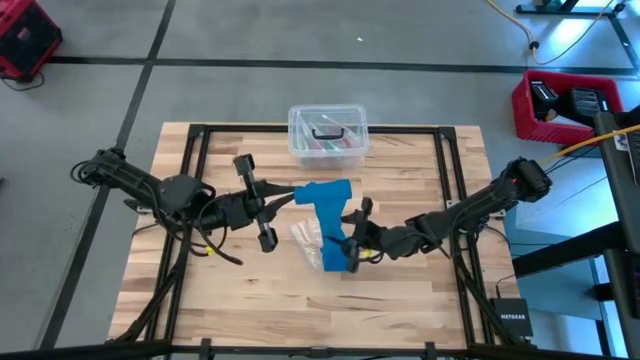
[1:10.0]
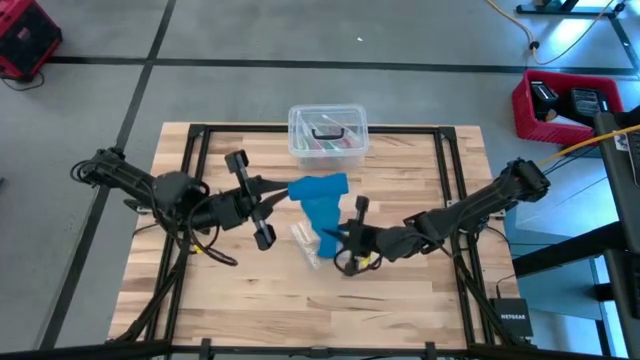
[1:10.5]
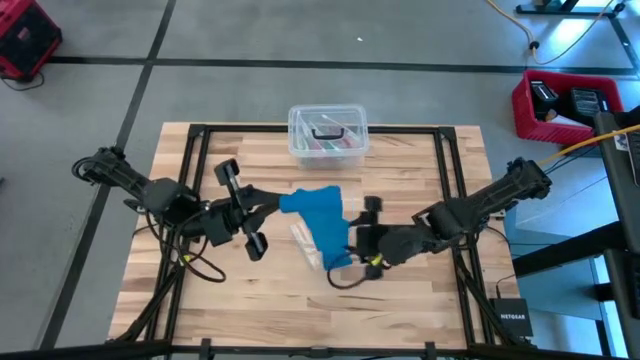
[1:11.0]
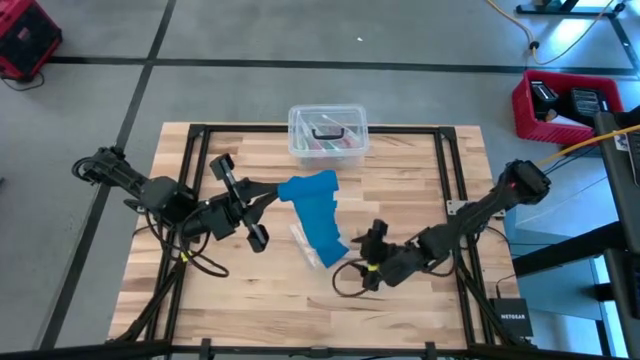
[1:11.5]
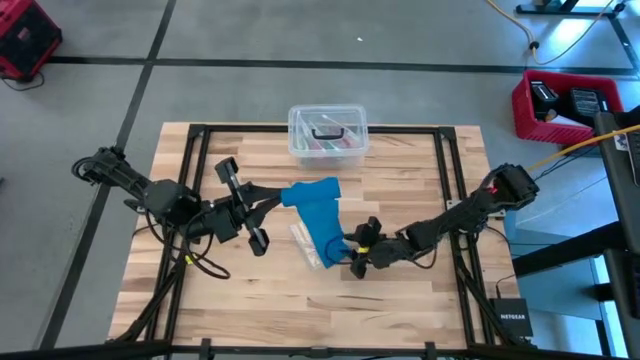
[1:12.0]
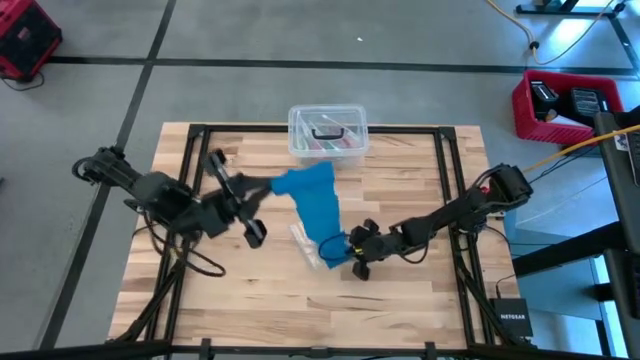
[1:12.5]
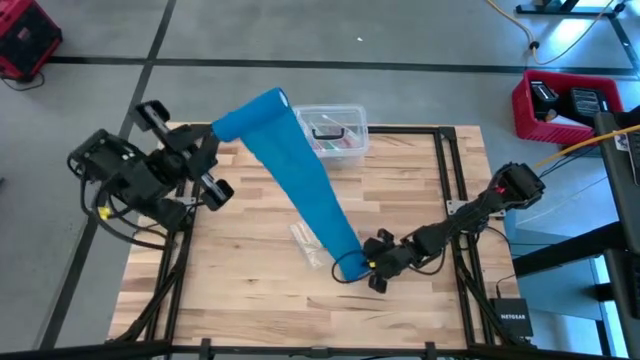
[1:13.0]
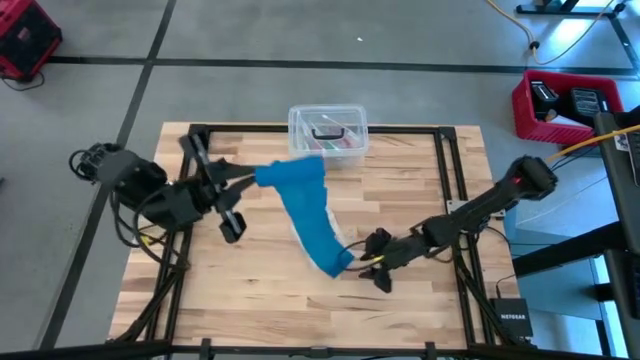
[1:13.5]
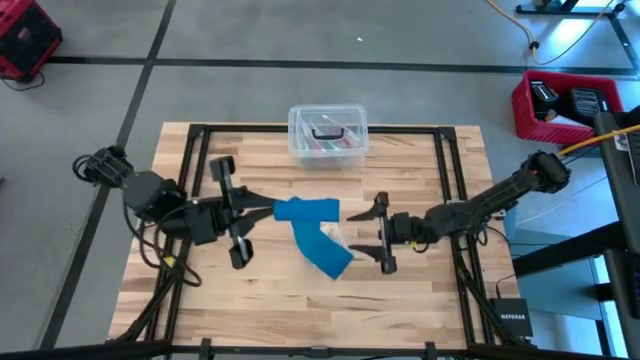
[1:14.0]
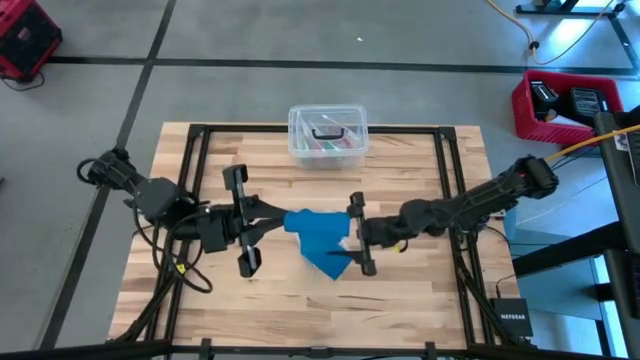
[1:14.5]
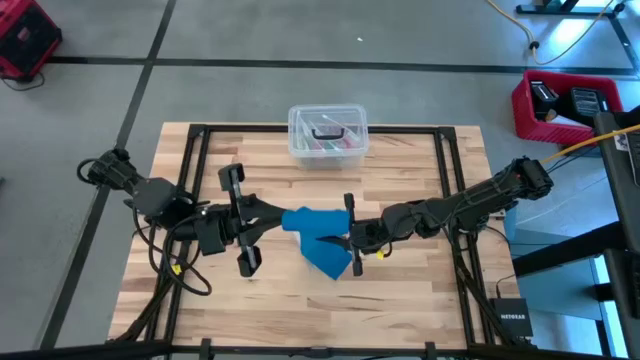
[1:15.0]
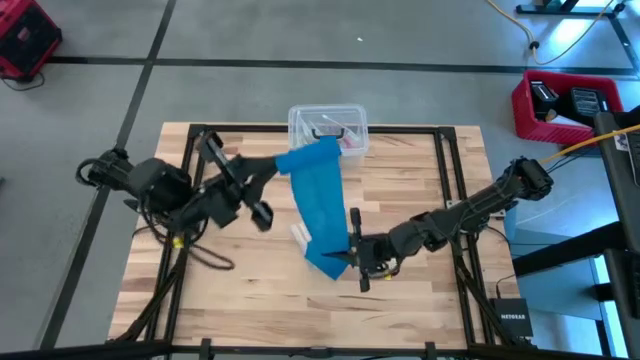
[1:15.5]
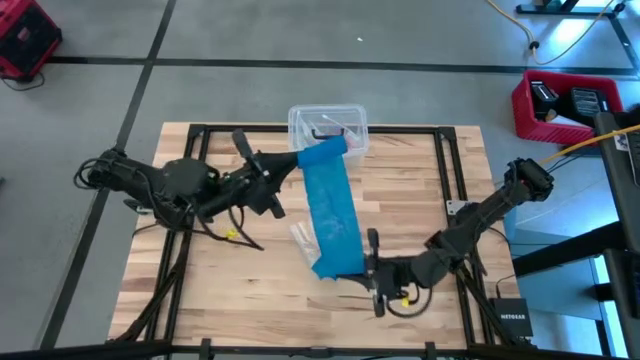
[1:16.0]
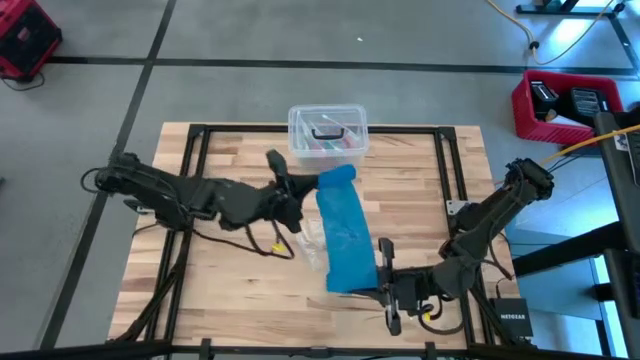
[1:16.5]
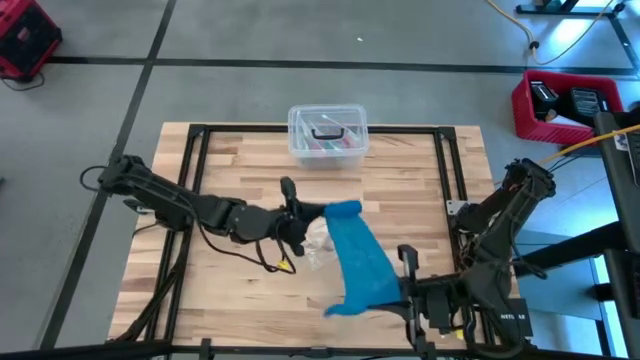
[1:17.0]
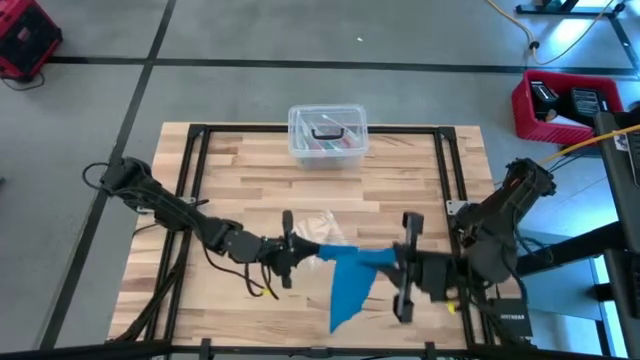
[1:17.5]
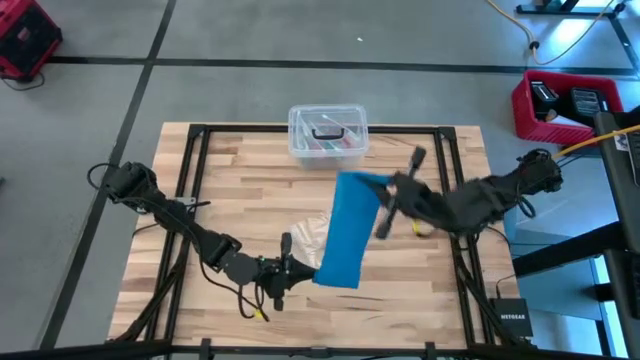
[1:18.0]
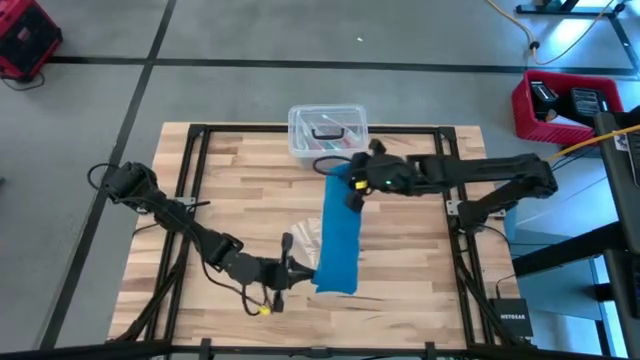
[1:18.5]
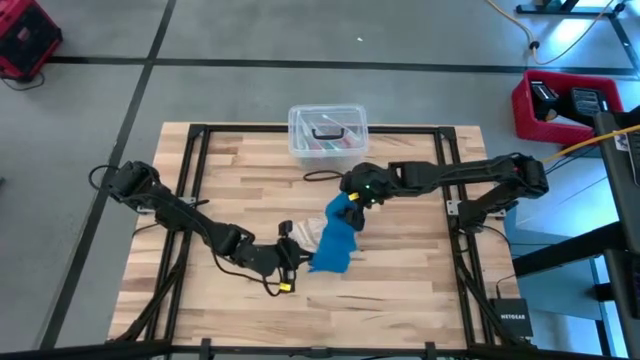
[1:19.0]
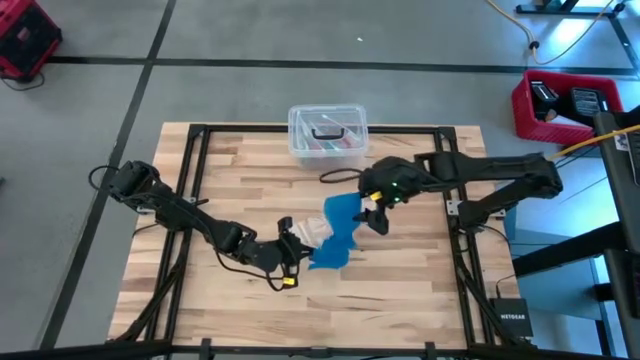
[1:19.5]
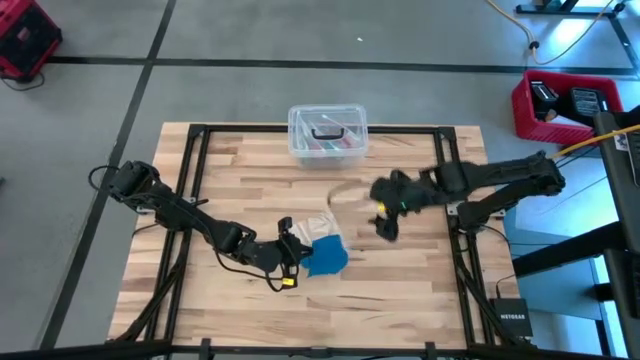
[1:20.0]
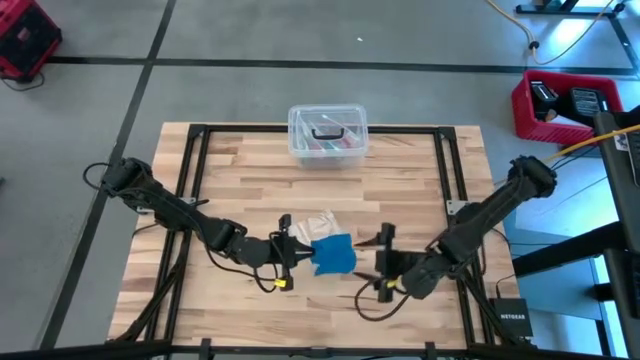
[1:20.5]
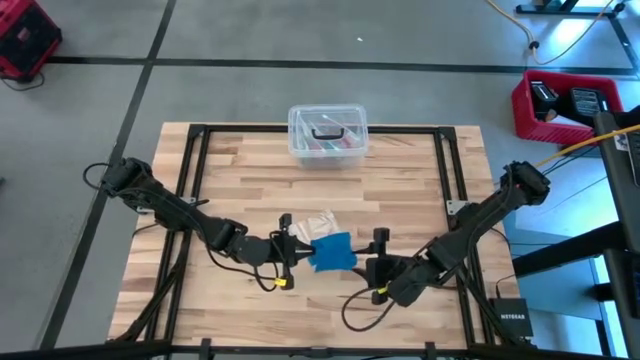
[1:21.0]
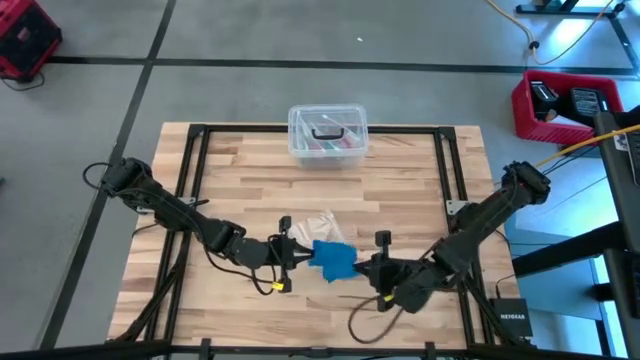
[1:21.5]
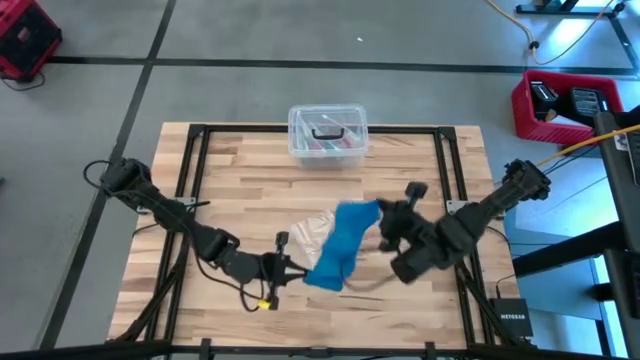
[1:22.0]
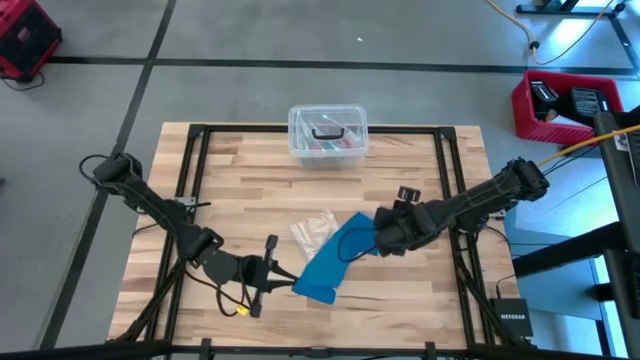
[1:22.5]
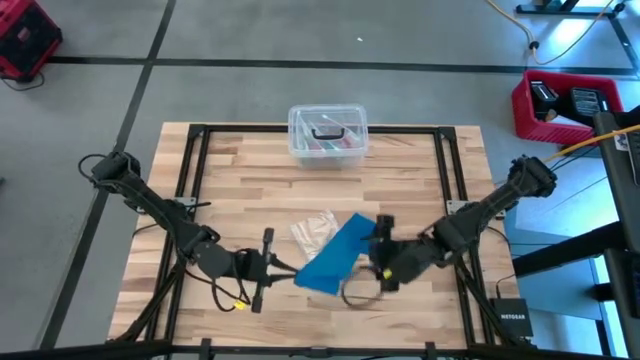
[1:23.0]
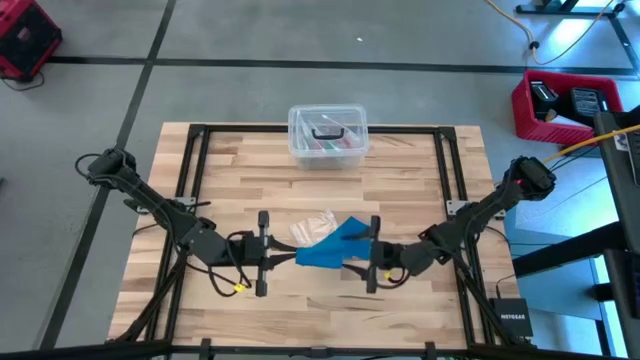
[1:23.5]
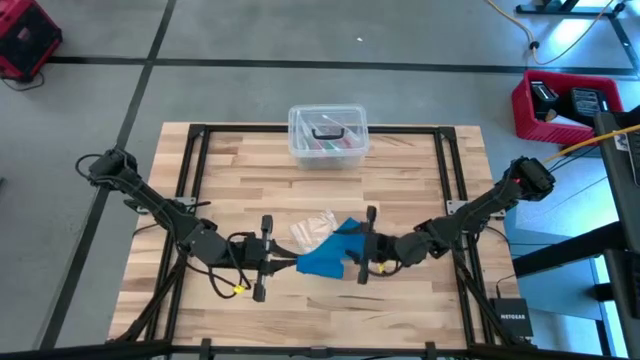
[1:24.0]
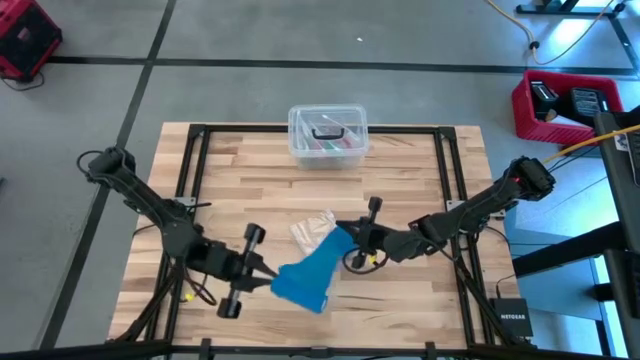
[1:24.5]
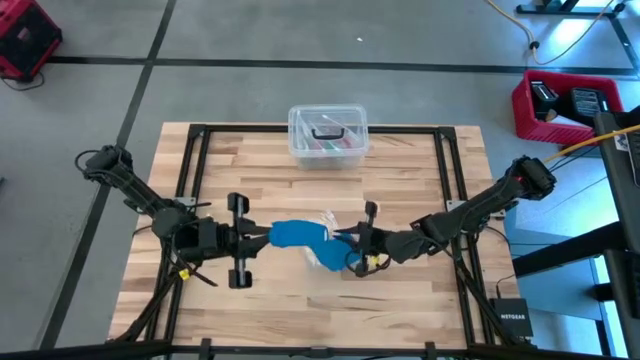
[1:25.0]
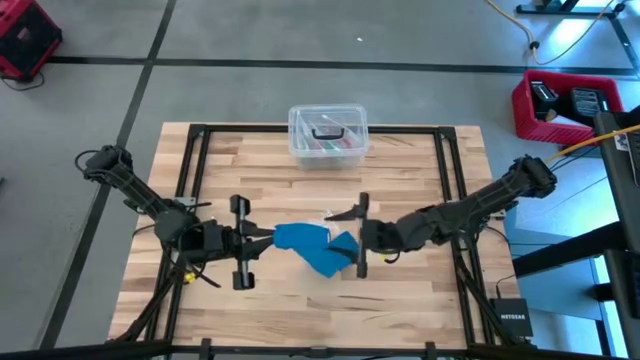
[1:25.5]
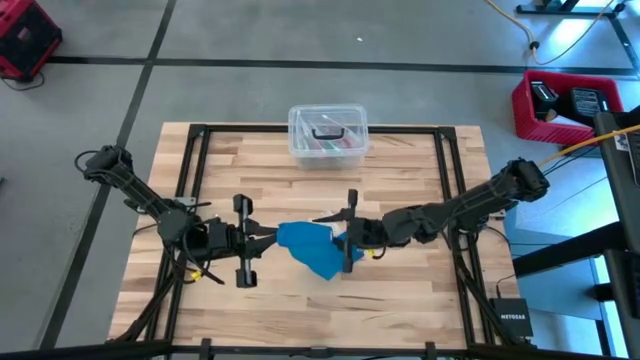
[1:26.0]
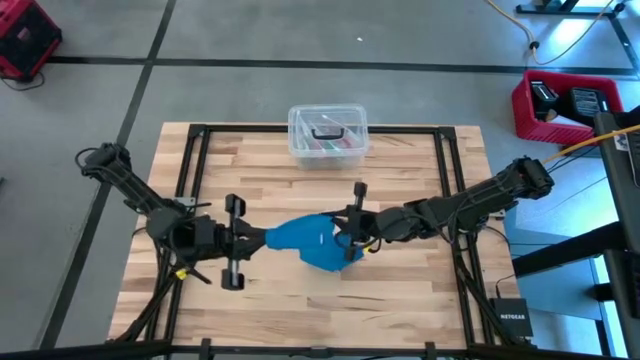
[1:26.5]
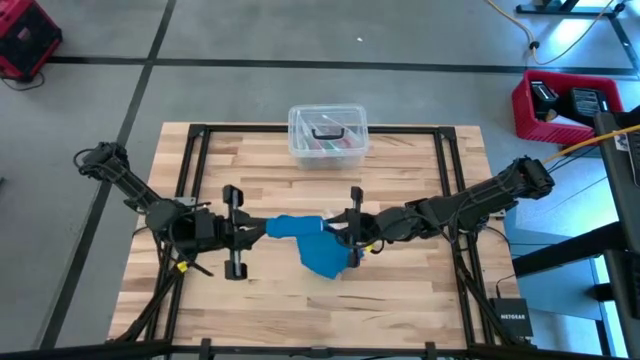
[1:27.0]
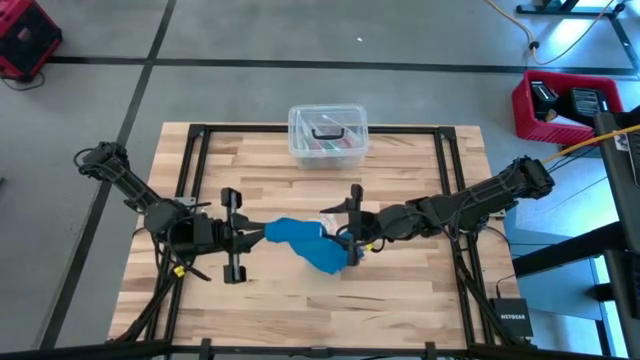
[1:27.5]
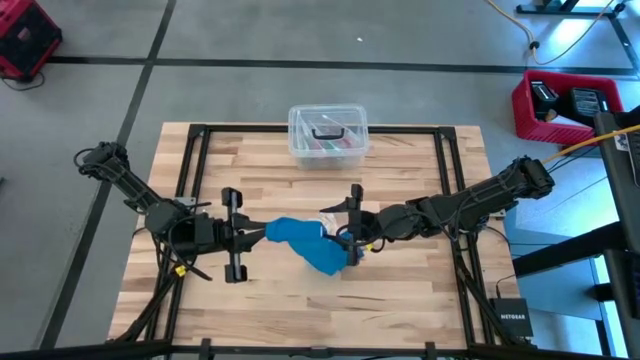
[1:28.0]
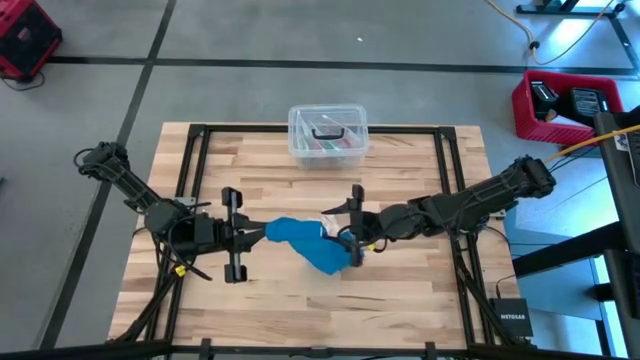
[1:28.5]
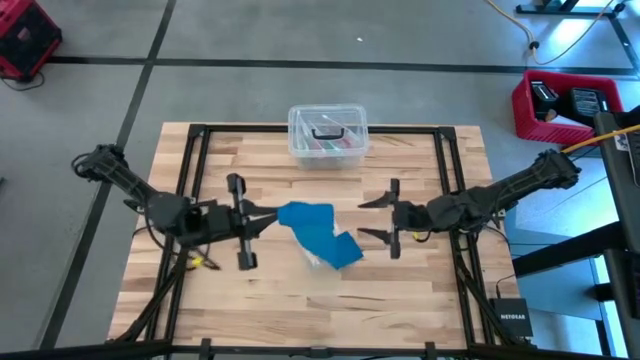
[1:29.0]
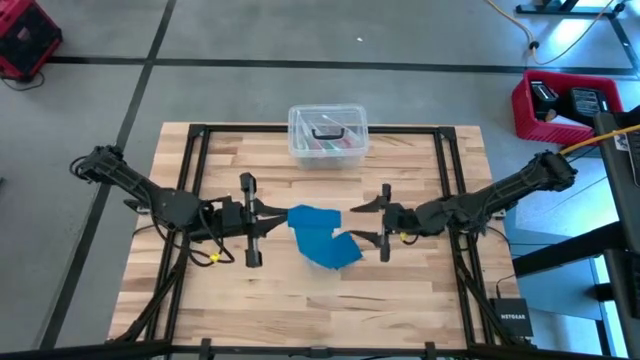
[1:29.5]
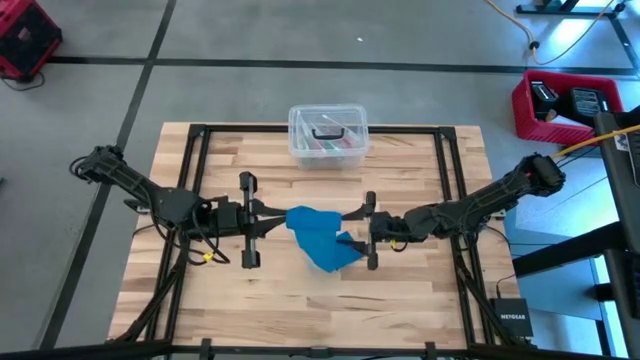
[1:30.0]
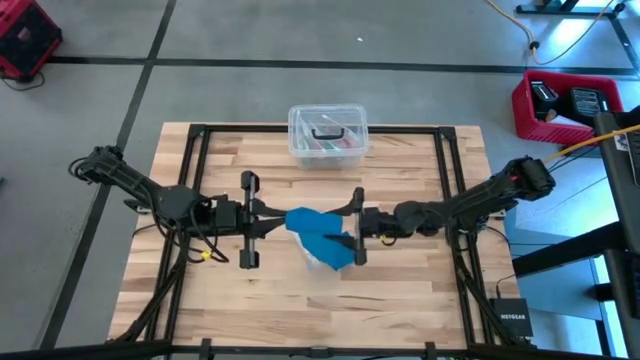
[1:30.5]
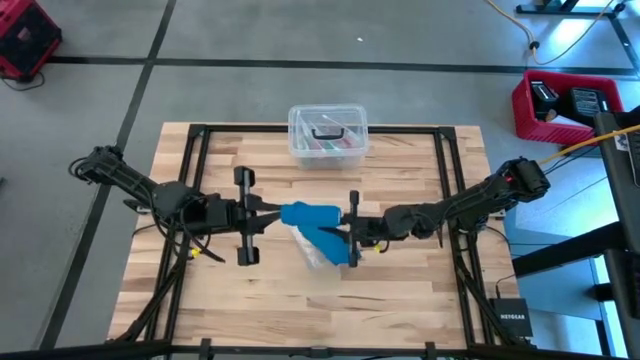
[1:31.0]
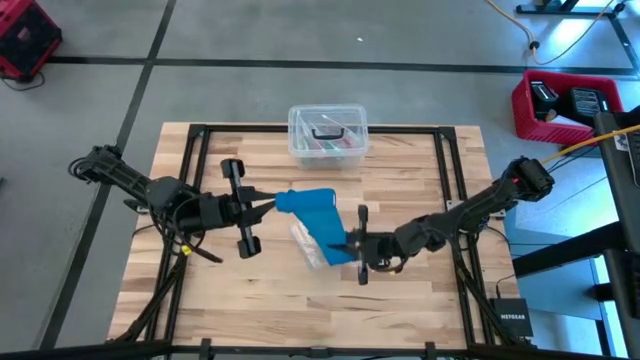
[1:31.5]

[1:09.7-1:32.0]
Task: Roll bandage
Roll the blue bandage
